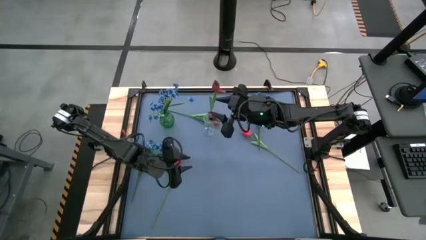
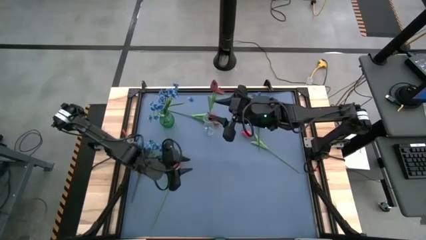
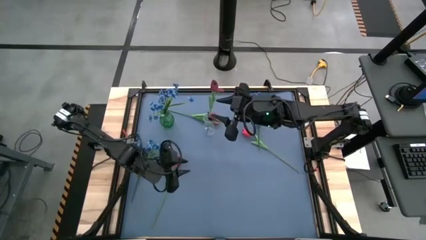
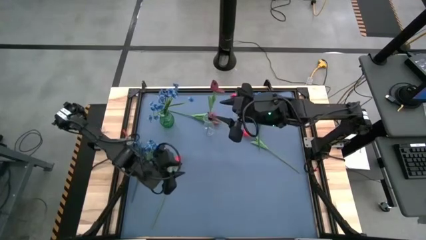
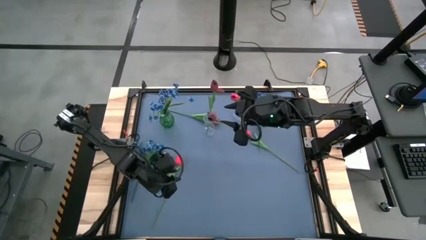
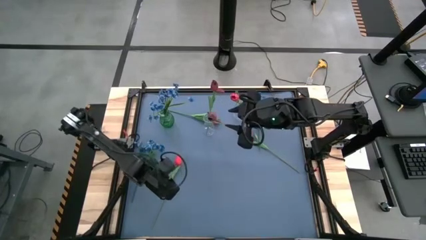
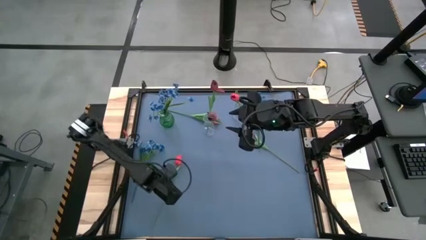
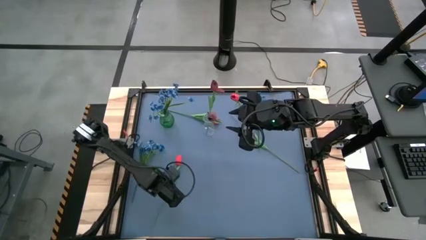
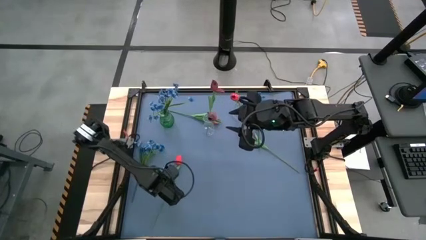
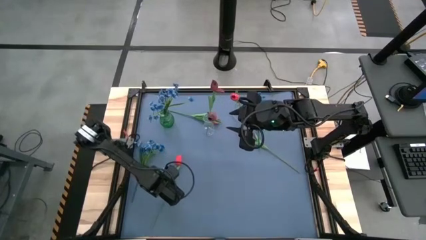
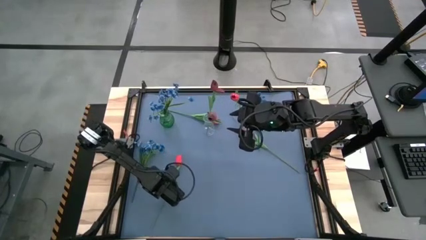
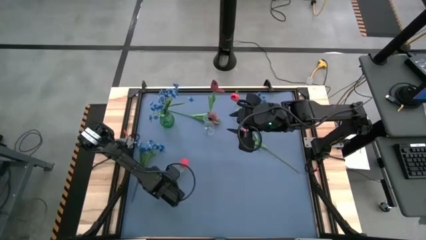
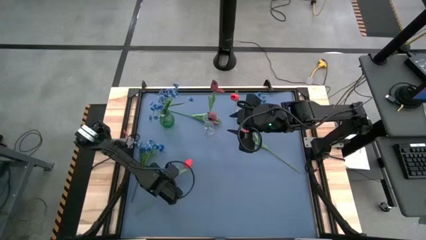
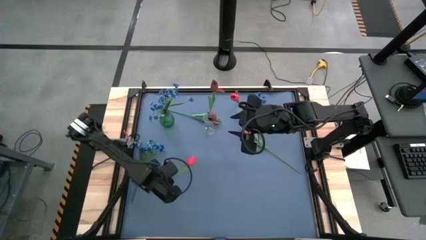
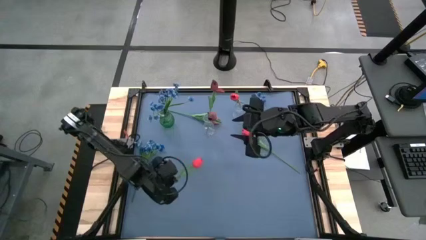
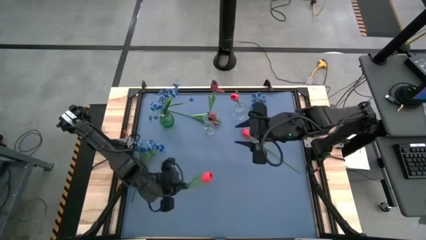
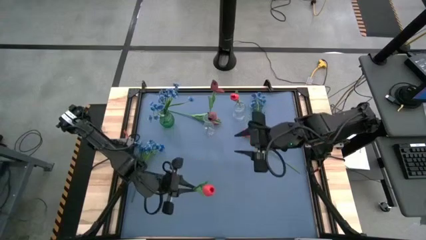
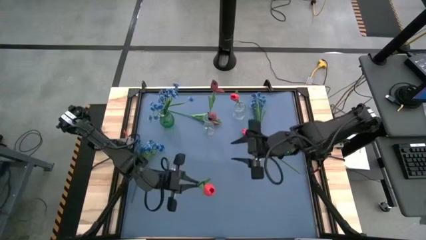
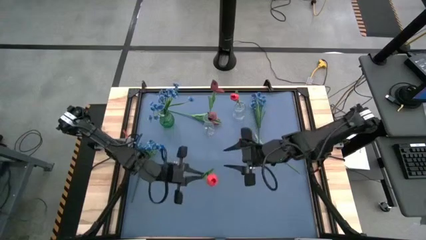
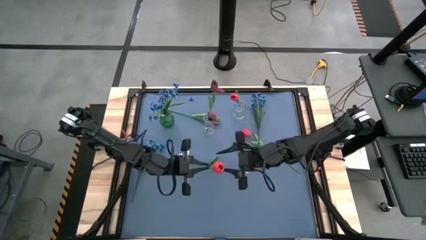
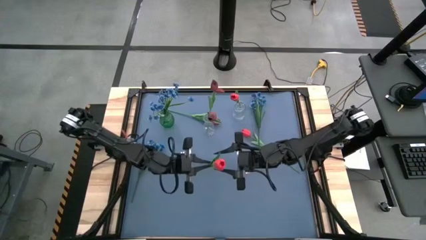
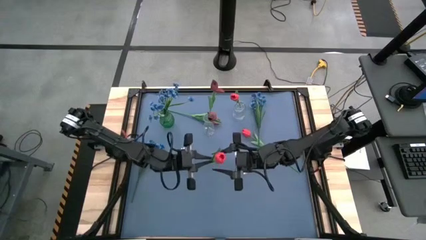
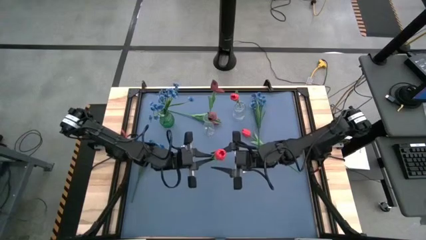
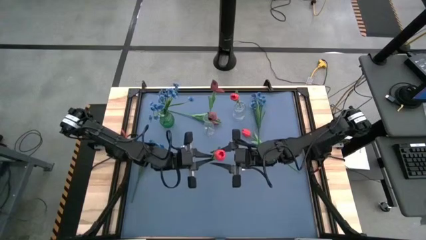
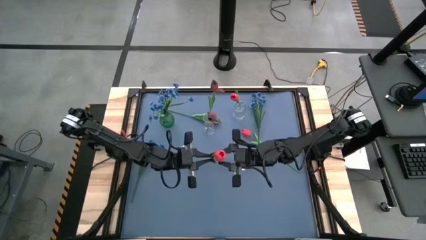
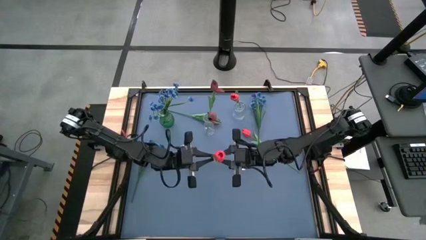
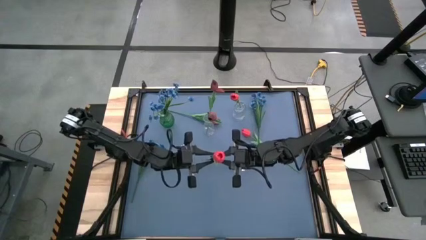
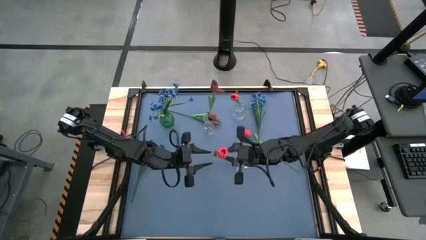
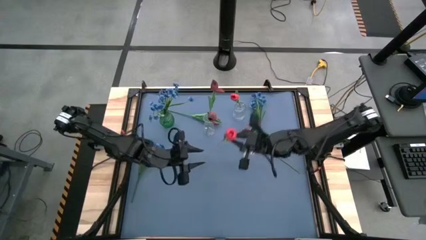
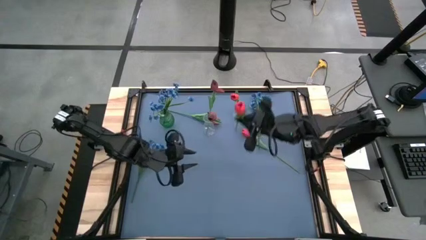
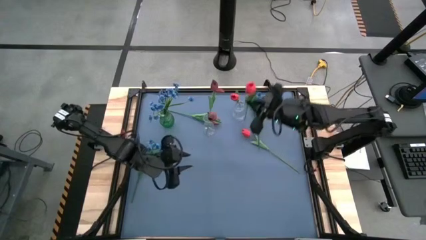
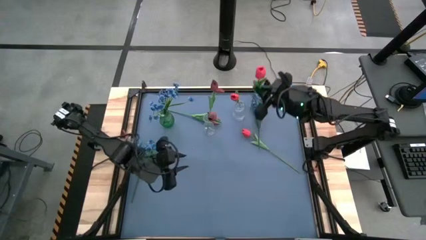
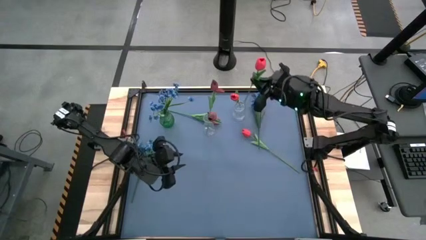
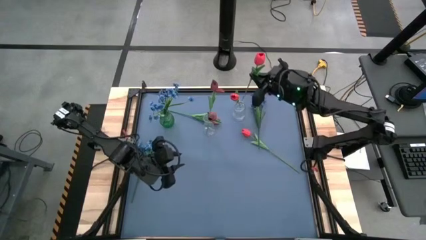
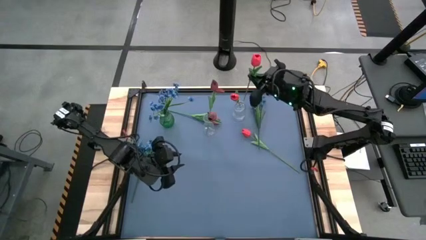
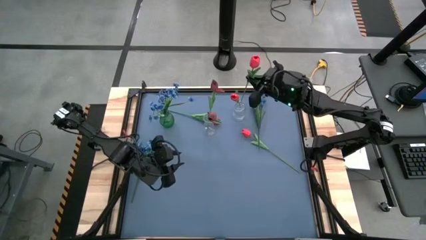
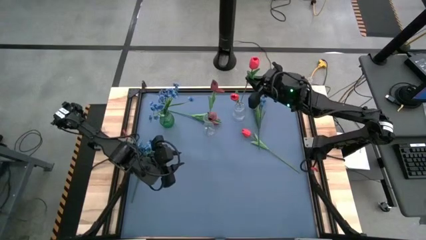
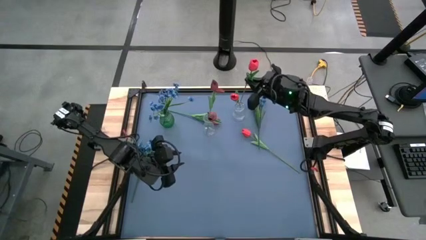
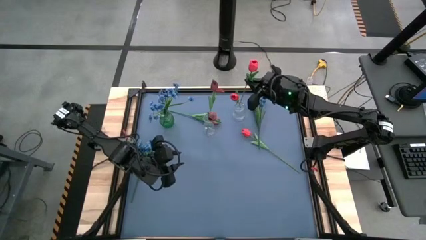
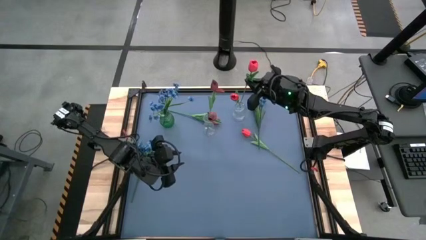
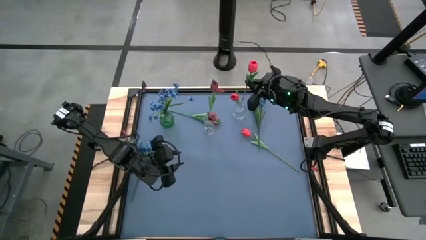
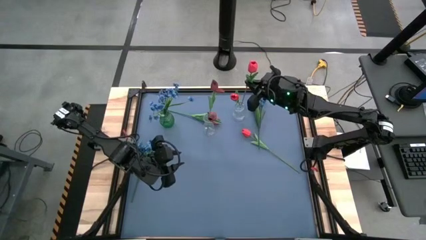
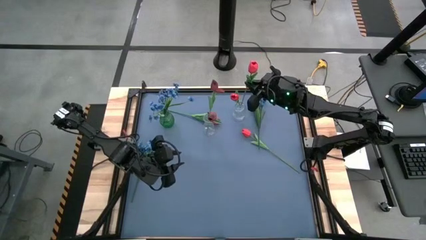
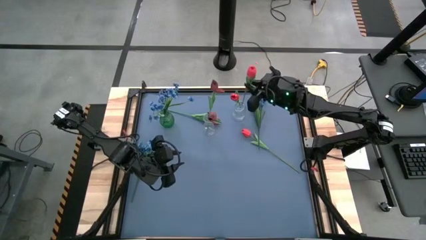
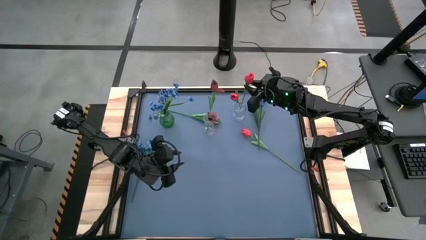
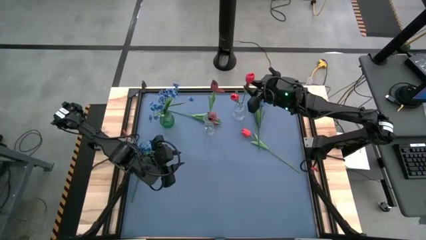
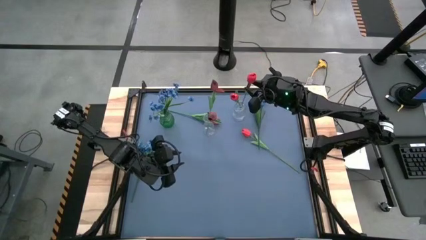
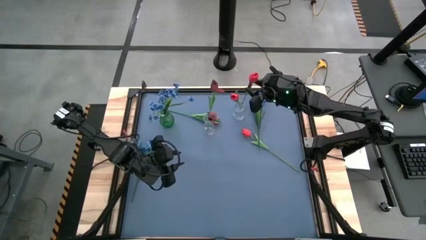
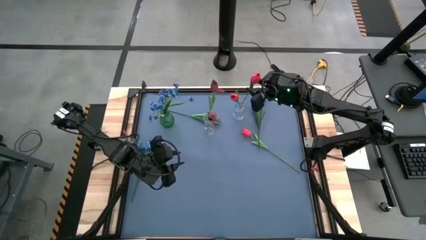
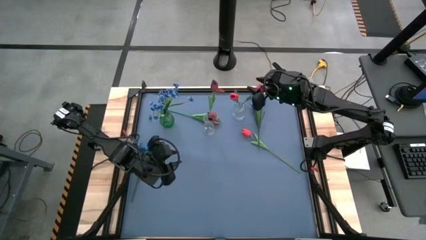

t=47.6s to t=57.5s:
Task: Sort flowers into vase by color
Put the bottom red tulip into the bottom transparent vase
